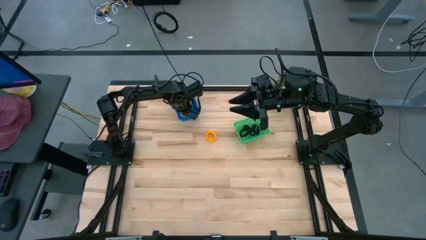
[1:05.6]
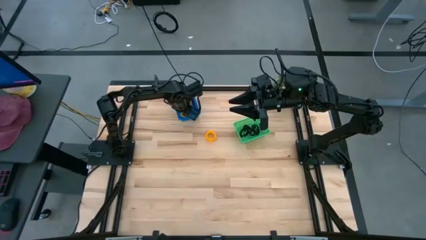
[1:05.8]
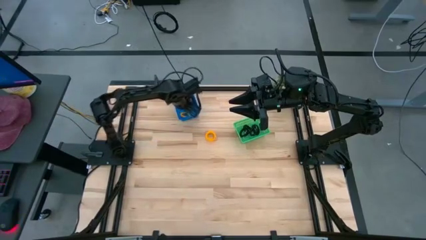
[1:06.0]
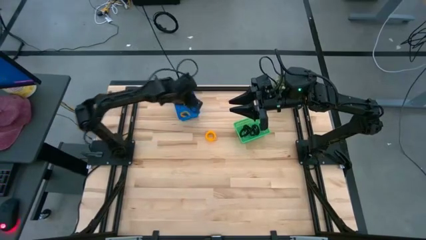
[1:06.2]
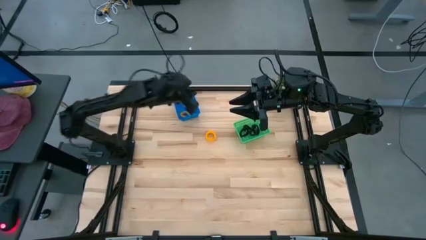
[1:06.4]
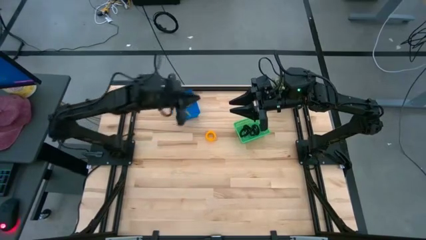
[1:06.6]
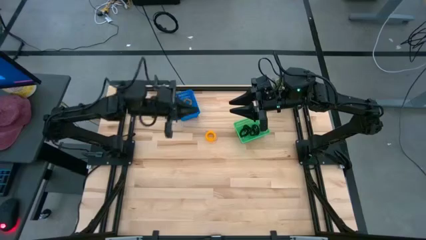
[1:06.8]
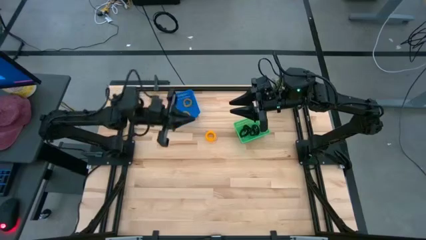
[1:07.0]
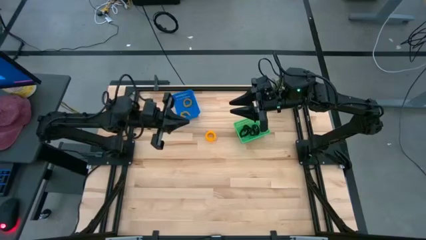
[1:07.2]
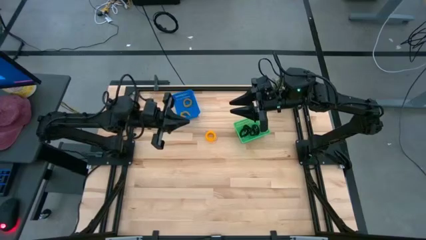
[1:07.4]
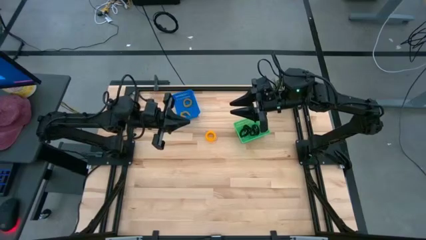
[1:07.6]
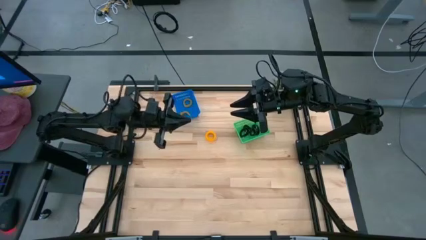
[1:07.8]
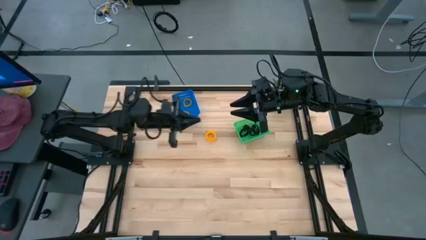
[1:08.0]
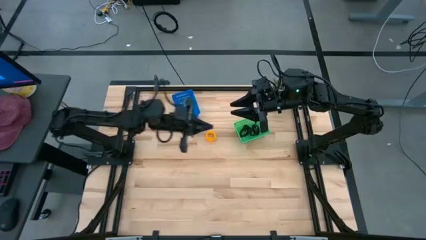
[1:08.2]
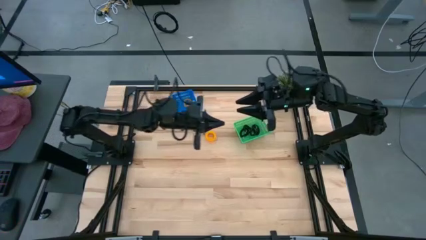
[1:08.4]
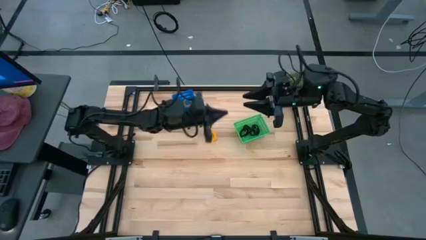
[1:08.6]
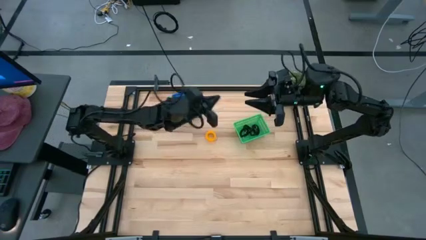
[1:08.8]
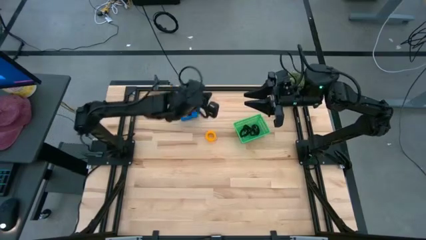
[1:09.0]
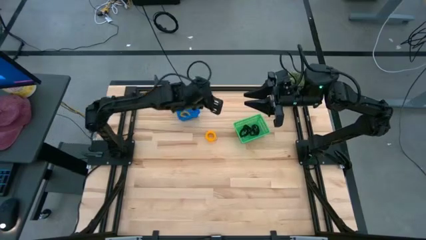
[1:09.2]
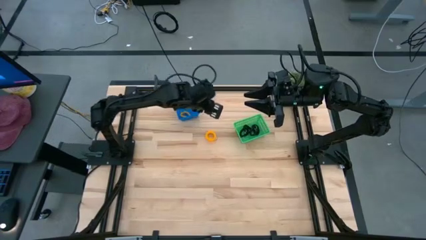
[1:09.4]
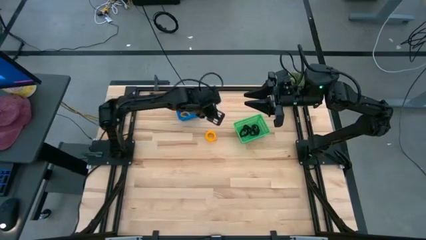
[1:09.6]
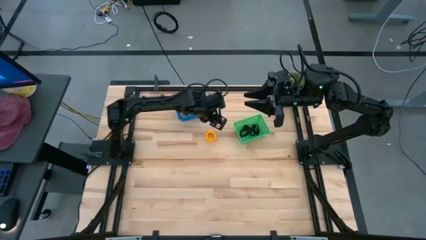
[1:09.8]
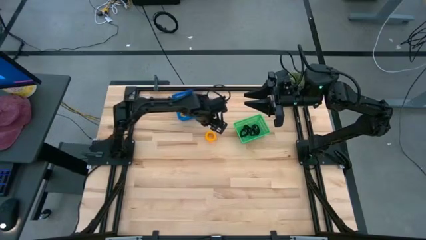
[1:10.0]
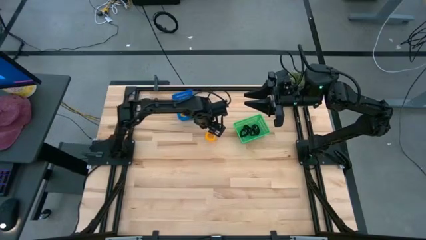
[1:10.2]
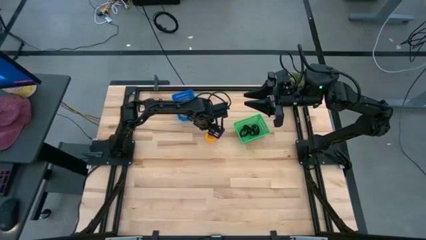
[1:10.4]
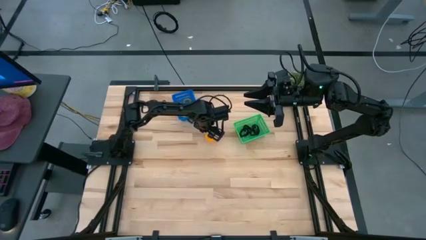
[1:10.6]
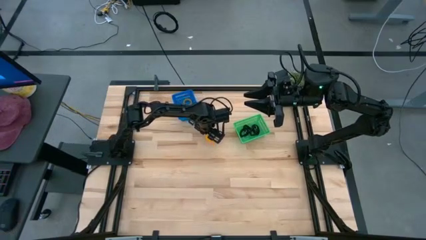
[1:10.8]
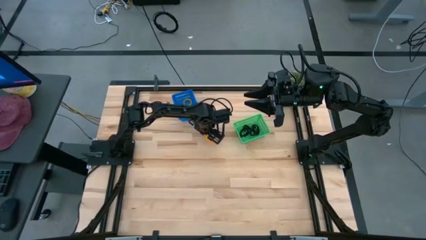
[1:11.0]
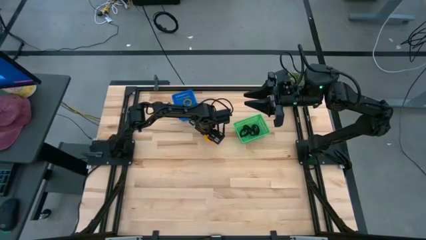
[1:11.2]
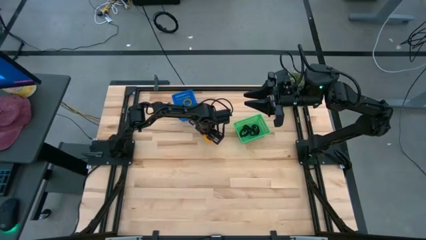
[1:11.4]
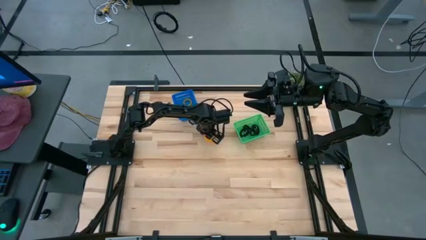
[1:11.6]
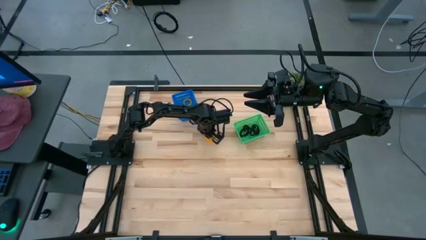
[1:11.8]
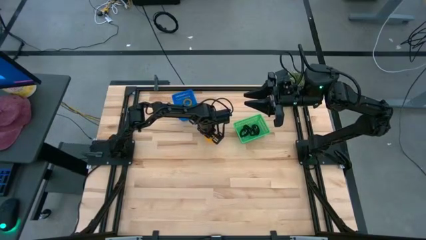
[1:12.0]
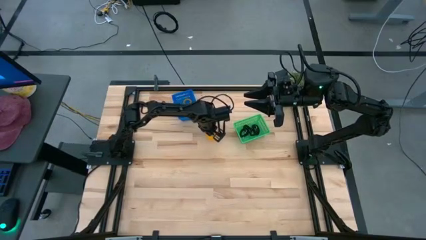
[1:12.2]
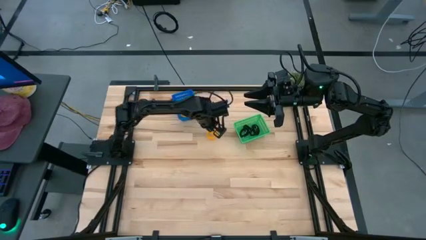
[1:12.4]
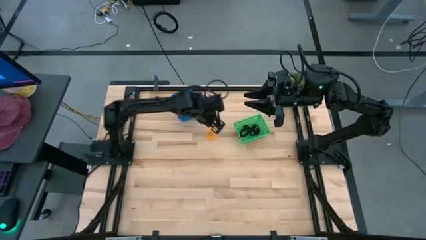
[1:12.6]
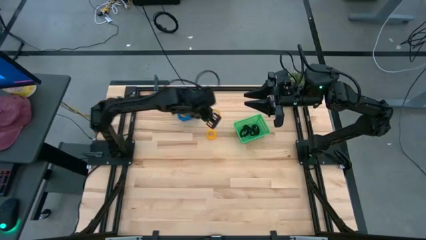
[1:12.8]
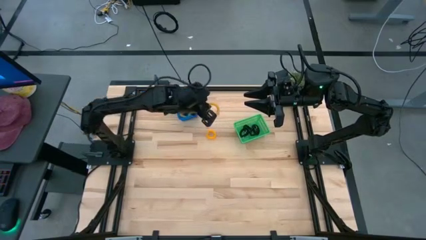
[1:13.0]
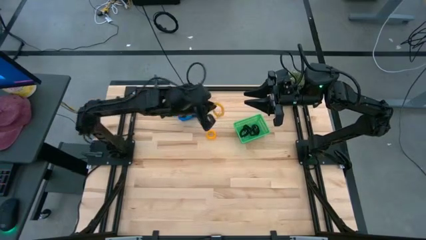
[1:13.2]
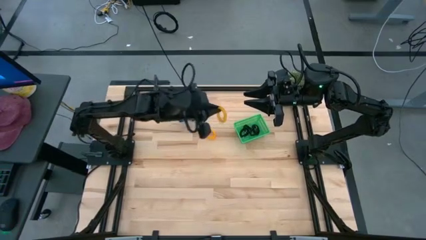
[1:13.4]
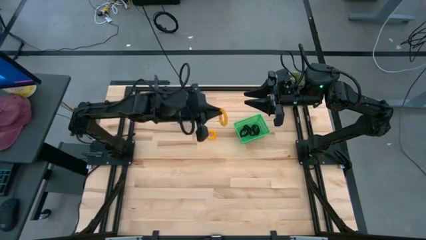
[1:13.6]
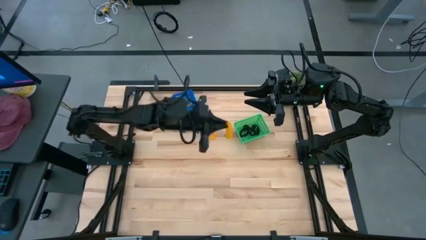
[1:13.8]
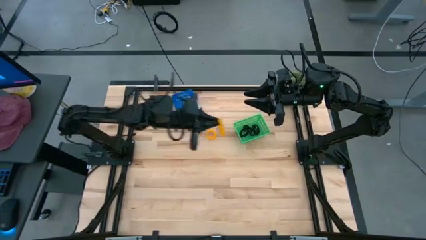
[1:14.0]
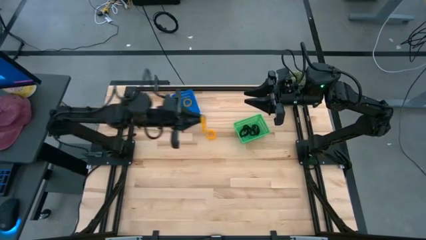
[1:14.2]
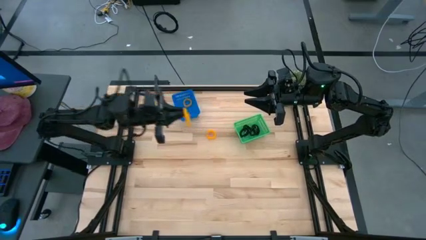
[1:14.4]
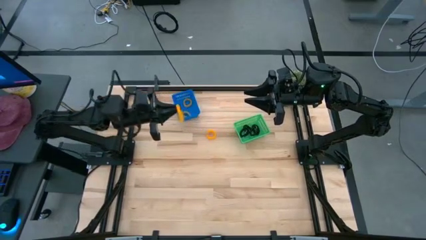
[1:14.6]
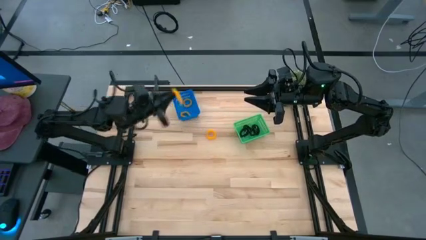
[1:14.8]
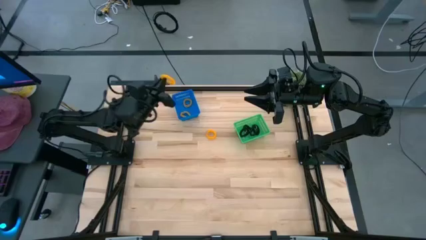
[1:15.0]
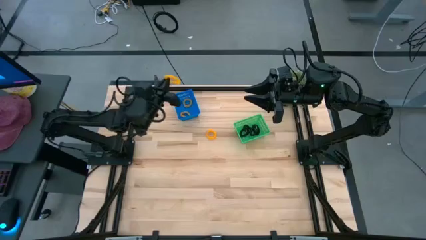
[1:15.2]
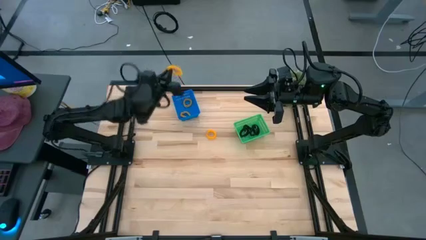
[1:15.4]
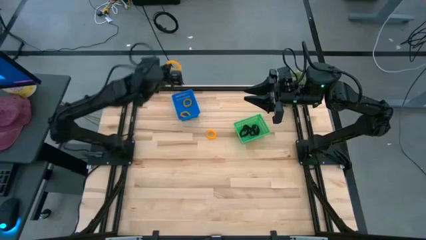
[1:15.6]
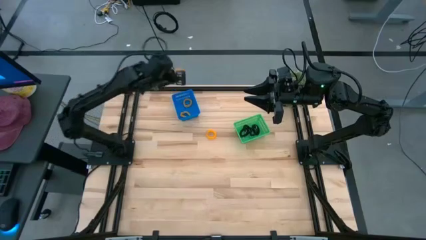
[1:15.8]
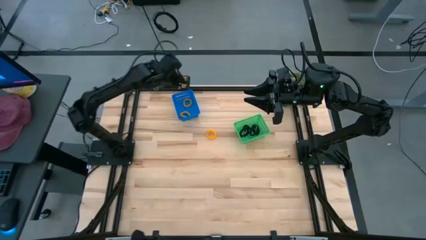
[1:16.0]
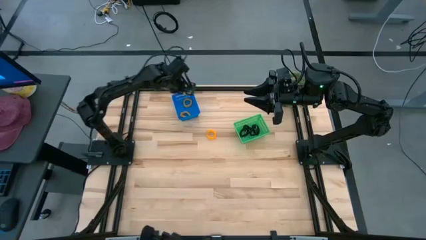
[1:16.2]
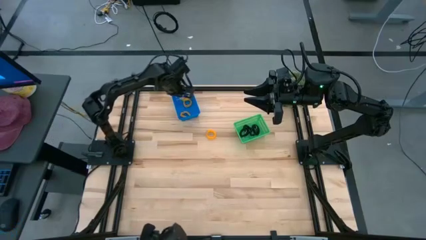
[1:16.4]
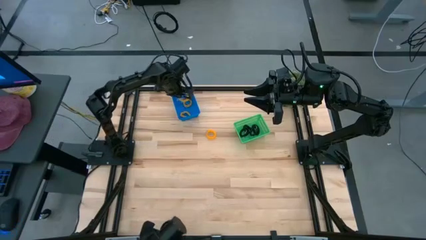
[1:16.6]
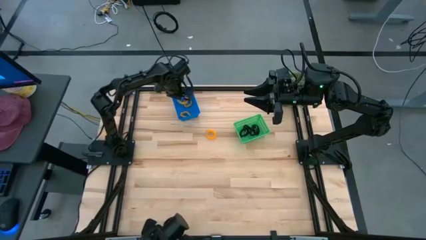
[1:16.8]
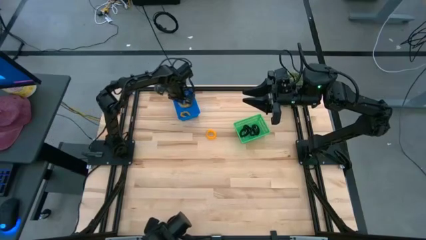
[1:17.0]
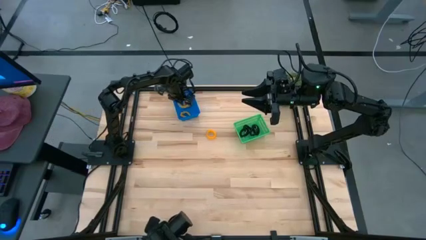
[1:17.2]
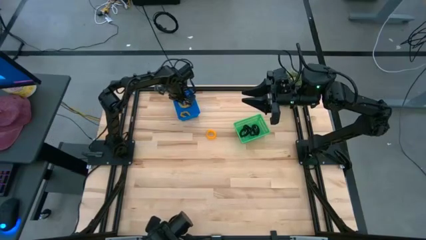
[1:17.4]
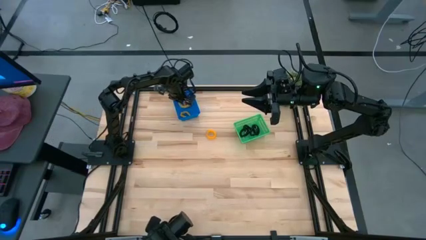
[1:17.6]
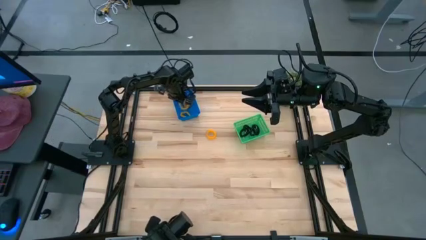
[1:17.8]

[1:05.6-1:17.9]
Task: Sort spring keychains
Put the yellow spring keychain into the blue bin
